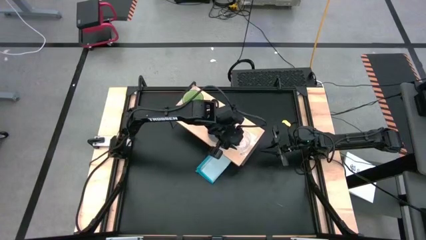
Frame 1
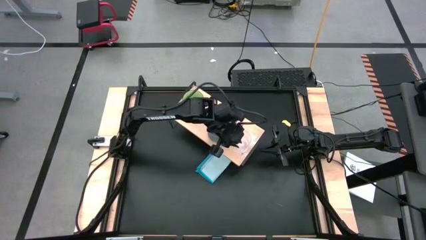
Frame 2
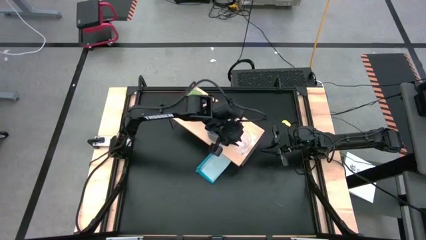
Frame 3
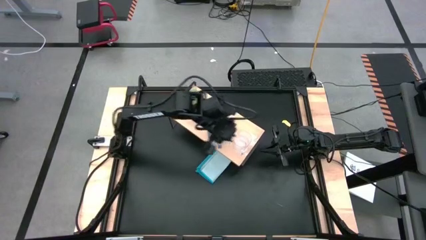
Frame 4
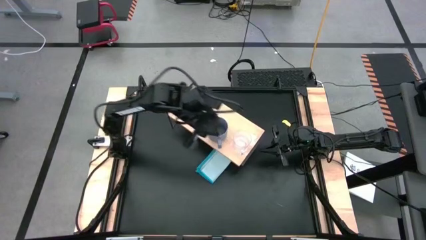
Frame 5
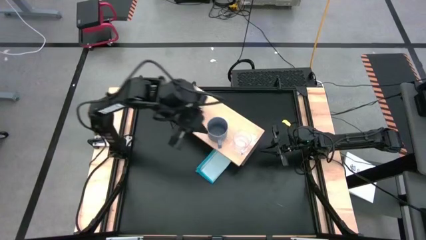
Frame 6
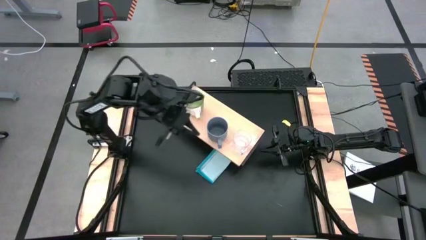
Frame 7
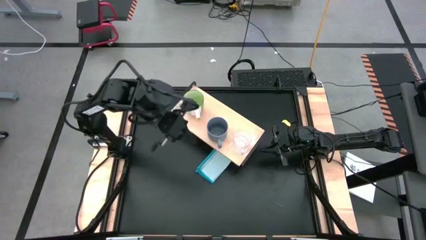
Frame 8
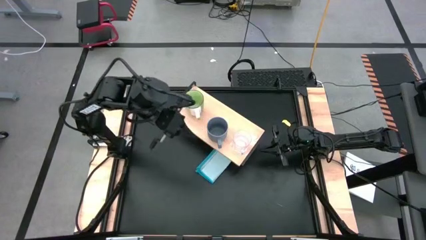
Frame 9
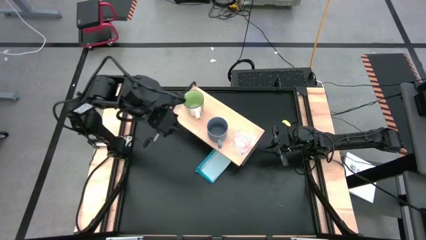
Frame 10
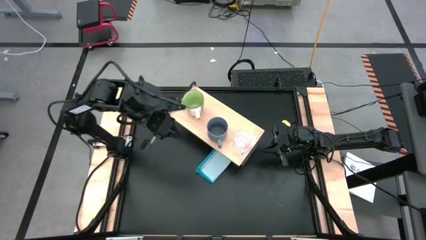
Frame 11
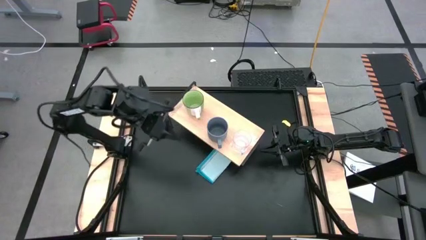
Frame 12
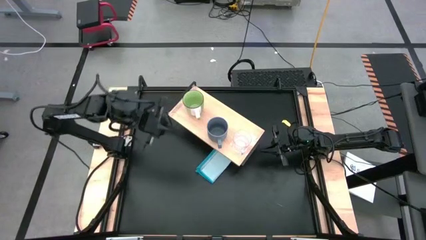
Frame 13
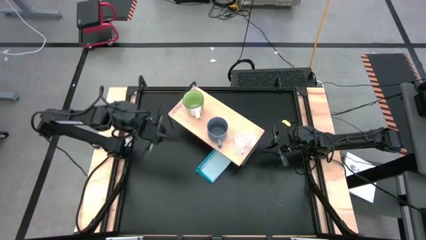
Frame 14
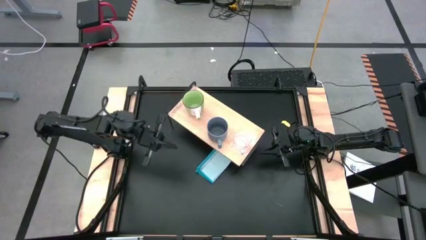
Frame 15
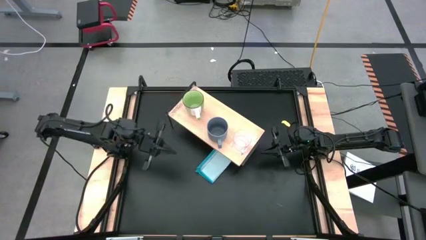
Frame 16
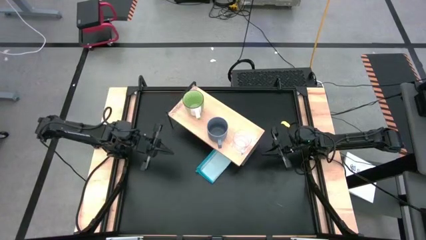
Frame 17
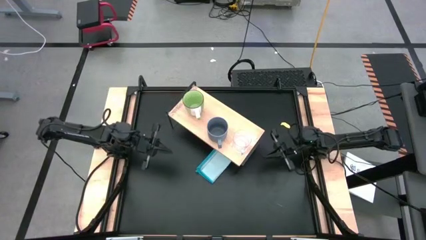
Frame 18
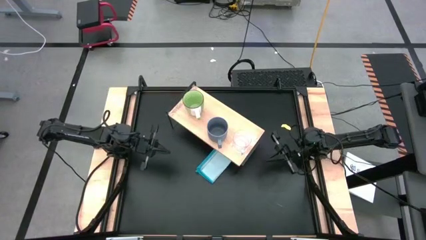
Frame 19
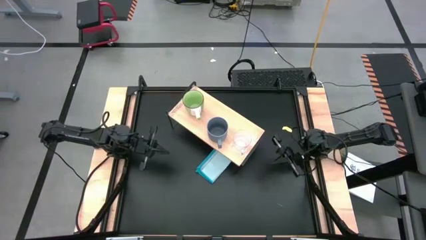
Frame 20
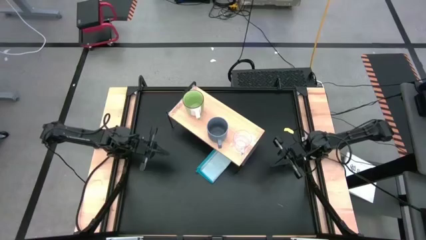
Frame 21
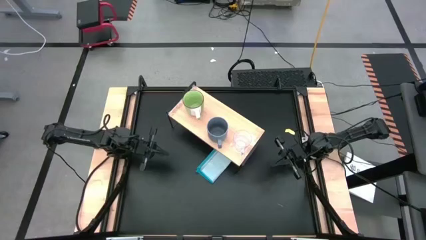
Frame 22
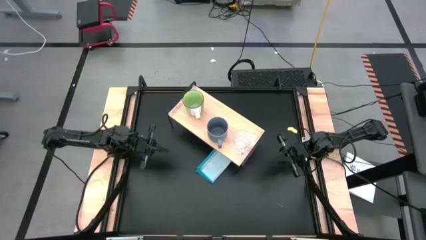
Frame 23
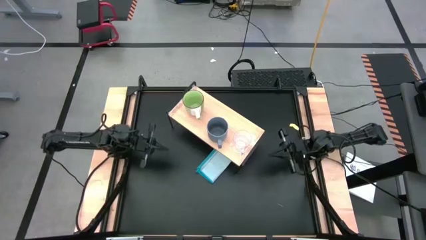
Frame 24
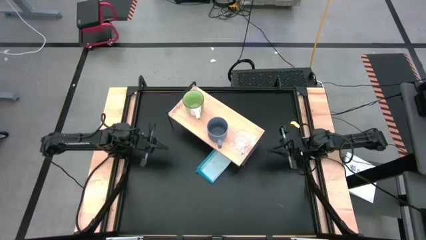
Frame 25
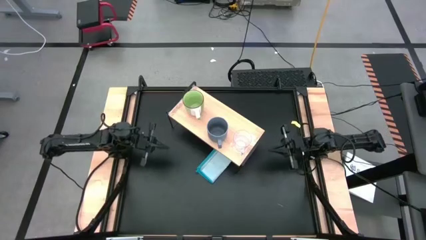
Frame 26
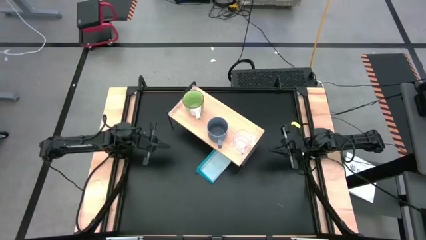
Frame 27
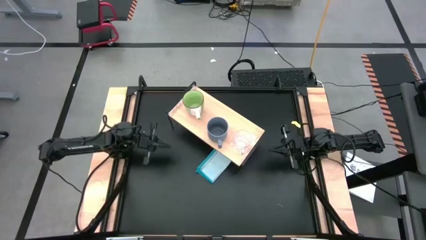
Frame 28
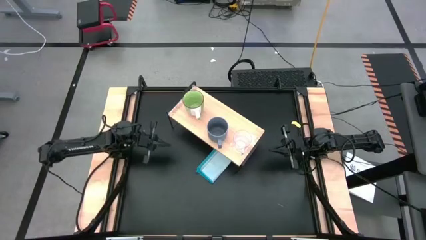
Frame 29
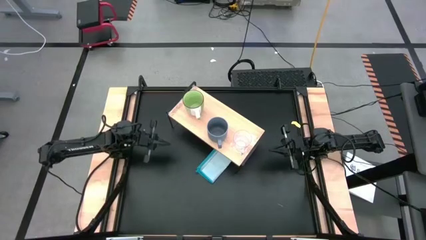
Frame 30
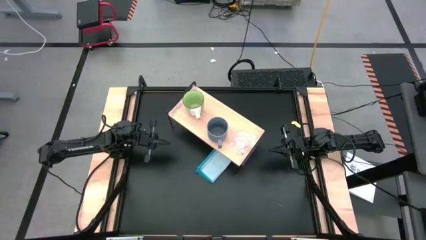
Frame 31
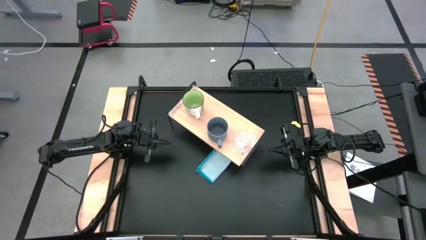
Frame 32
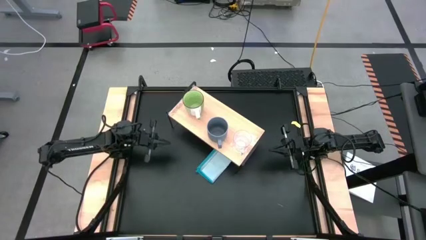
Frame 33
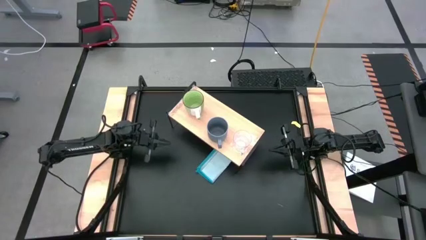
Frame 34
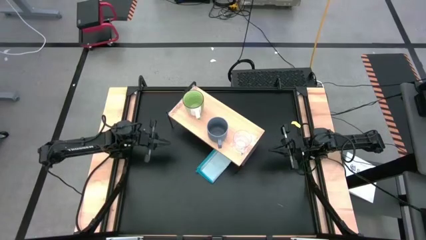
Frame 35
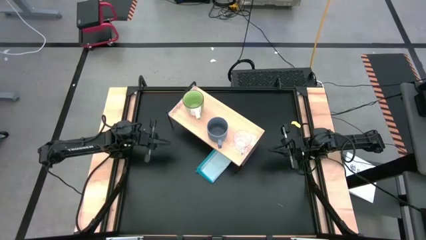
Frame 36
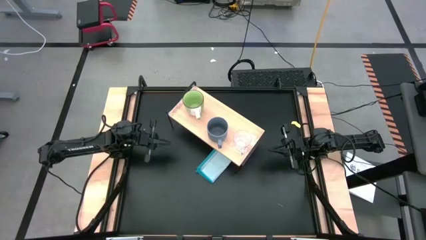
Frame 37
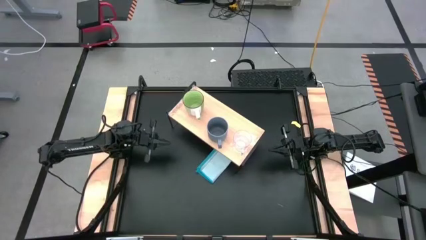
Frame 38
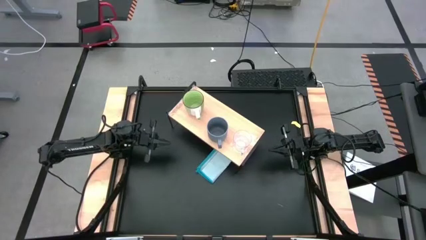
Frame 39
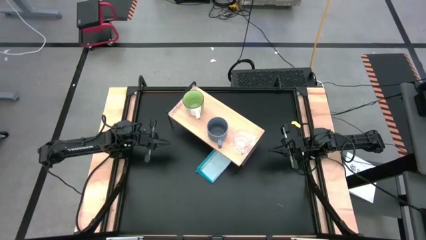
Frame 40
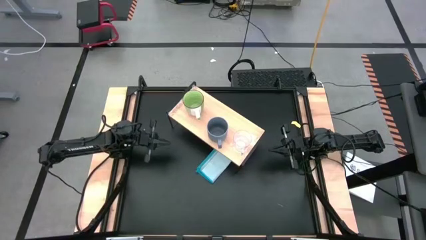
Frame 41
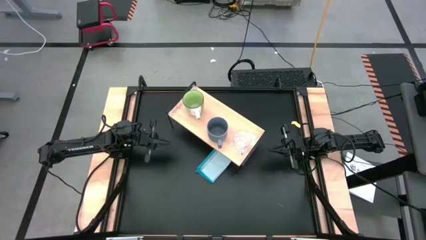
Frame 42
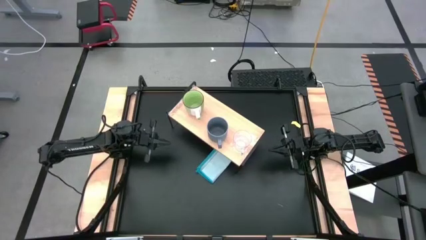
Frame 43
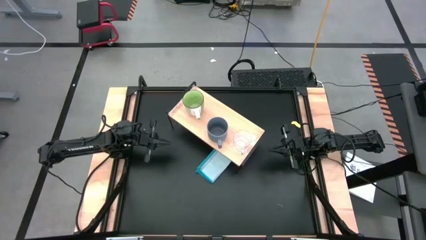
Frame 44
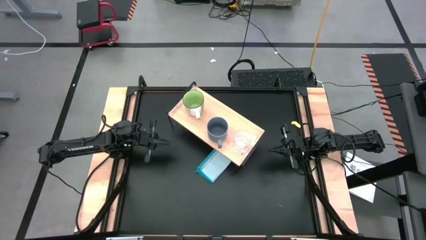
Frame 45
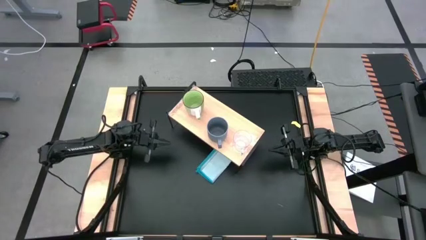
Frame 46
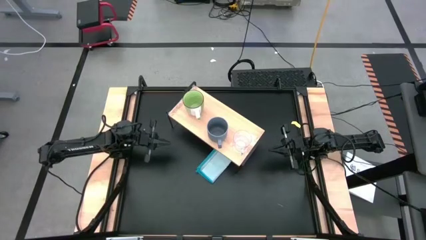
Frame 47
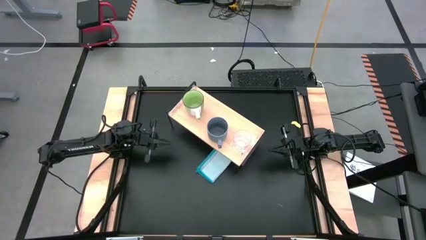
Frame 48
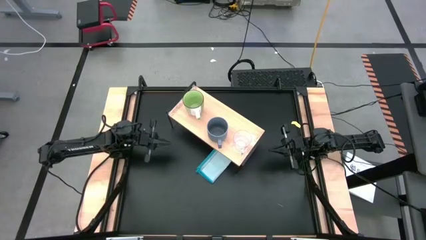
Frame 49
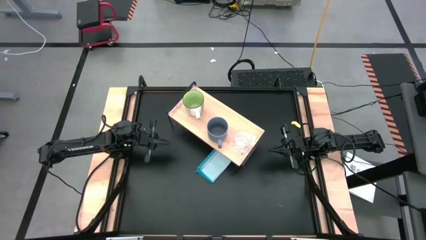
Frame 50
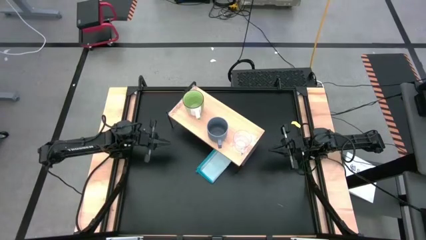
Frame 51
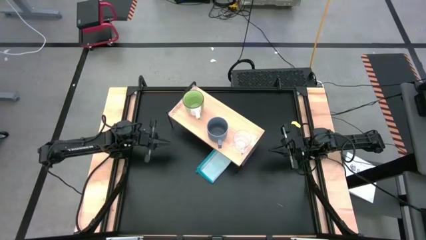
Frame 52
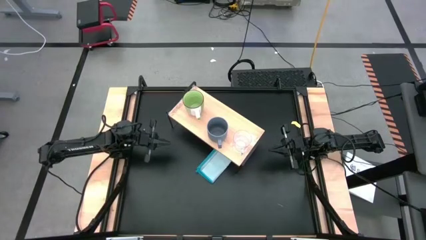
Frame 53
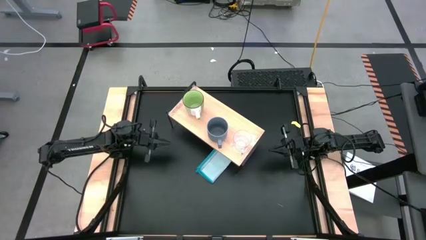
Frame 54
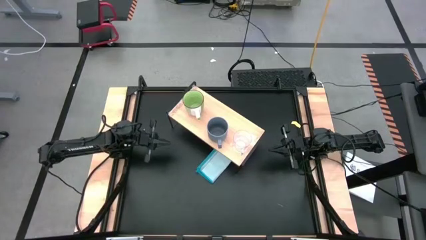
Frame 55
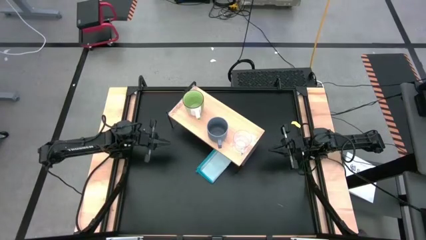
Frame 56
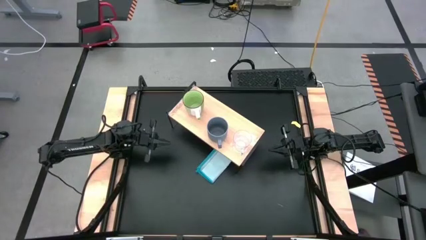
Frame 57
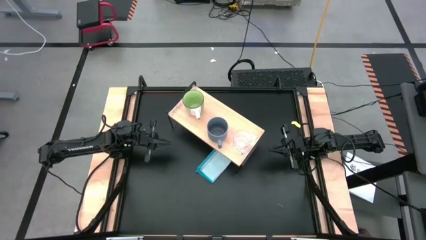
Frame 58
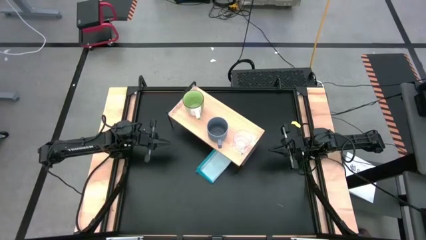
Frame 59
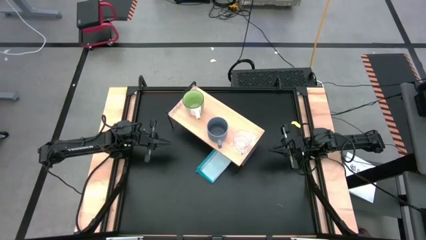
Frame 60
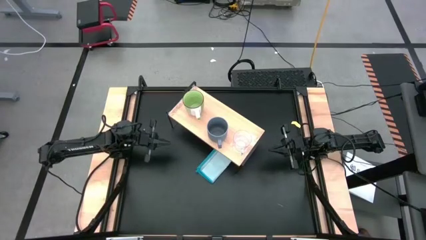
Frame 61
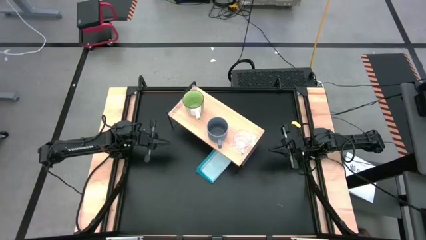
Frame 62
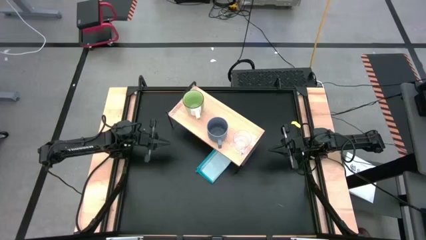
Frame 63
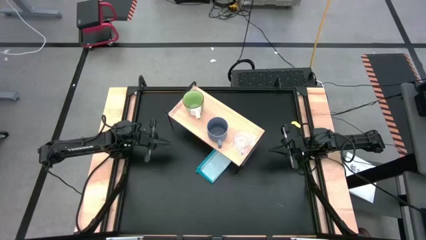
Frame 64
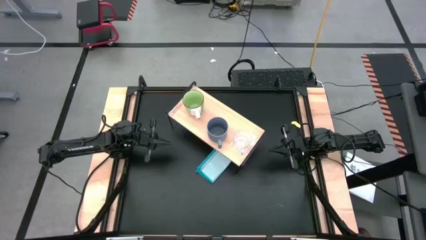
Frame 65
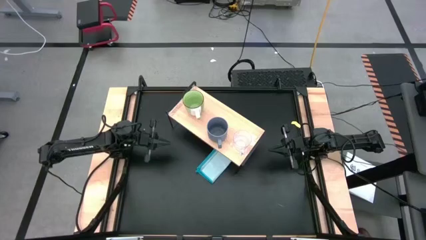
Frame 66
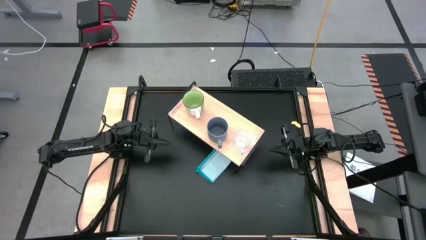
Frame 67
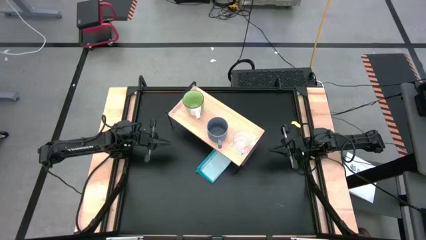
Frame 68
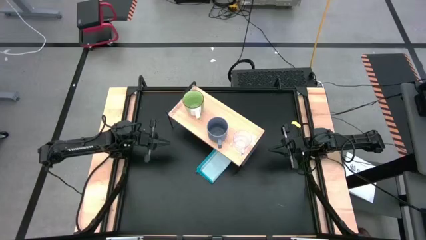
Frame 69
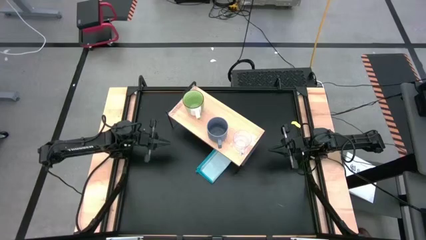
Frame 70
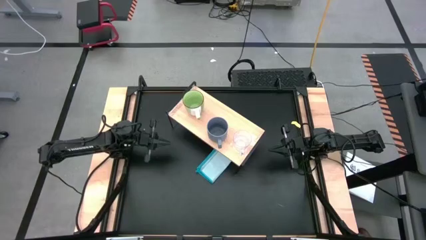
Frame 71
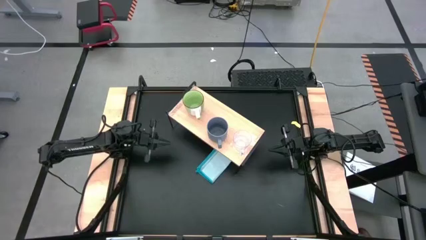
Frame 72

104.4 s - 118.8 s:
Task: Stack small to large cups/mugs on shelf
Return to Home Position

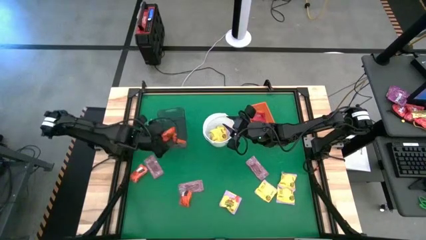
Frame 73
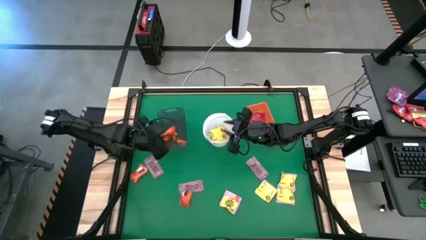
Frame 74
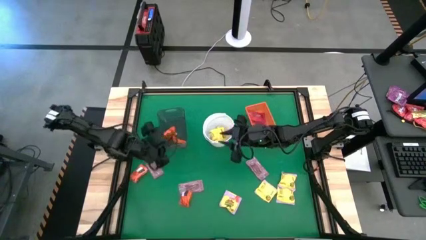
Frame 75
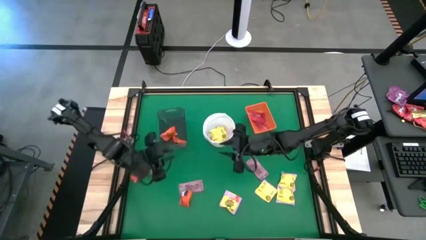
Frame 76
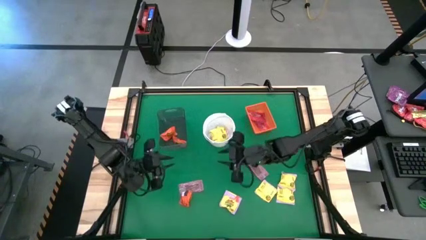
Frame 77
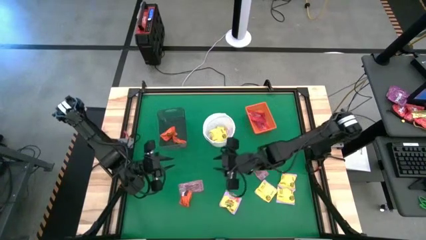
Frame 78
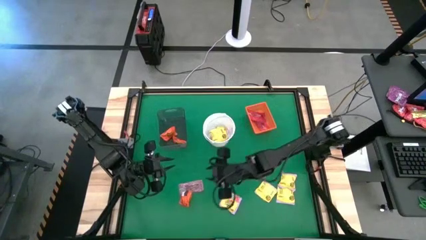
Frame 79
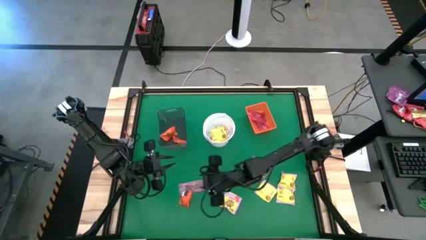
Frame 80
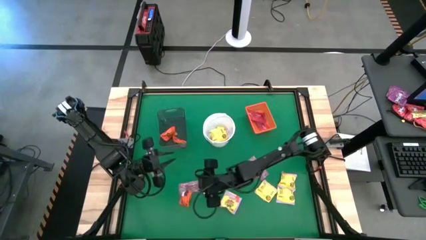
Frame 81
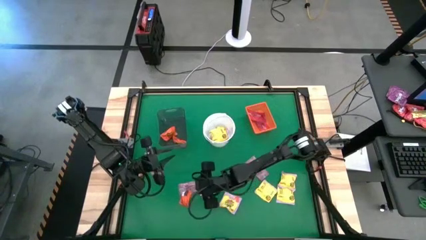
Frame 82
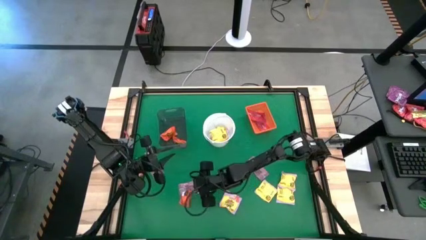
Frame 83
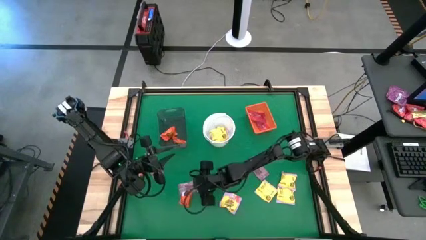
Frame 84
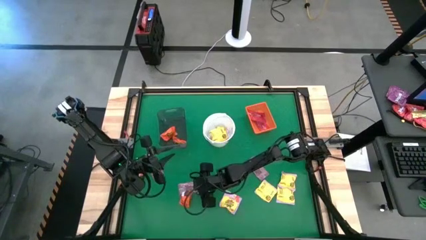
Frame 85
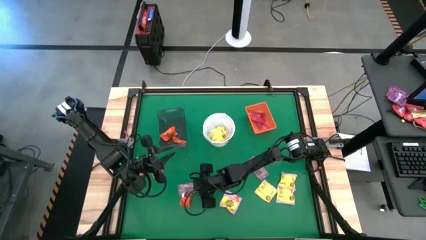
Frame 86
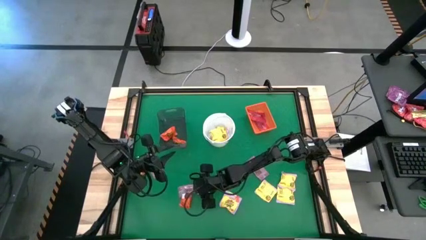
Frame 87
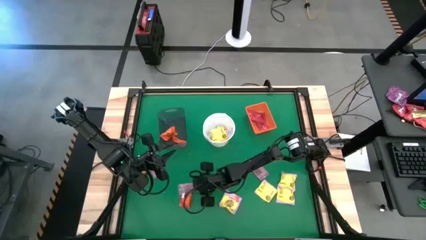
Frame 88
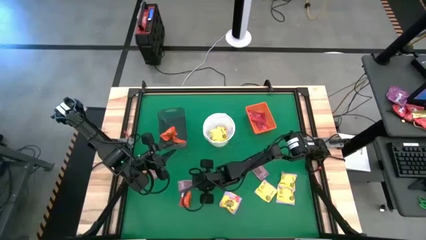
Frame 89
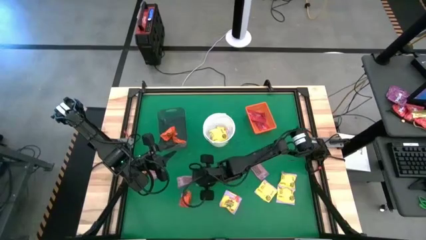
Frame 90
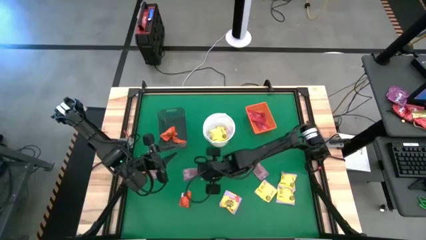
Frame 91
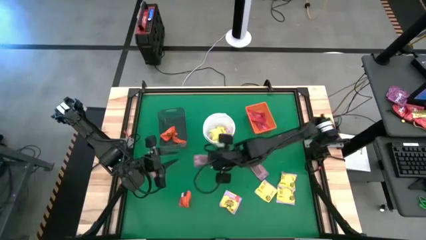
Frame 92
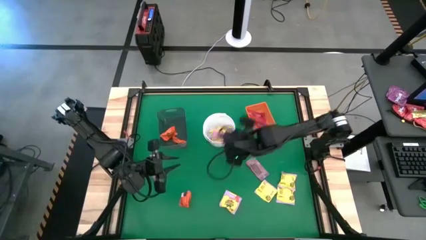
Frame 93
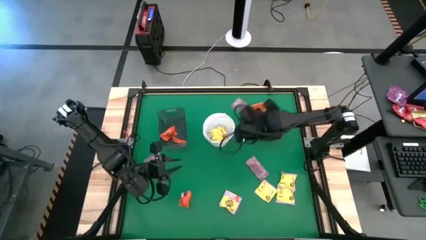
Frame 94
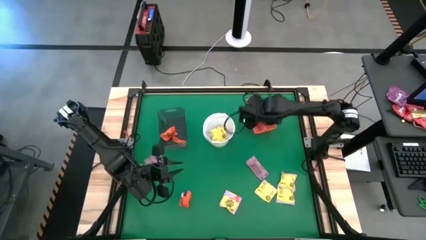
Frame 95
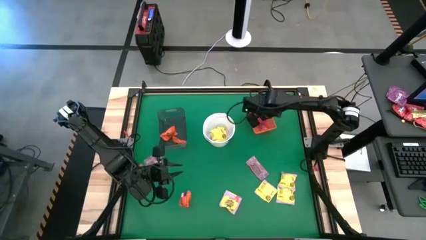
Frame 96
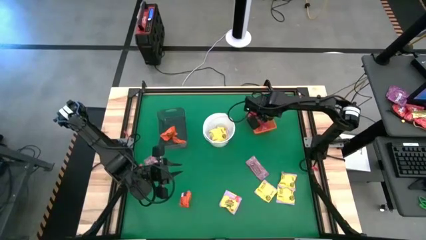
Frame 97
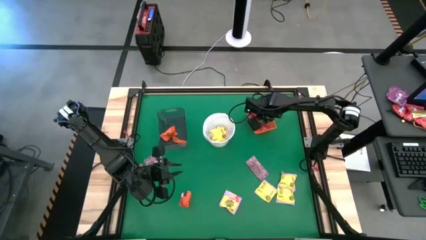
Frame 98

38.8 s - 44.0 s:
Task: Sort candy by brand, put in halloween buckets
Put the red candy into the orange bin
